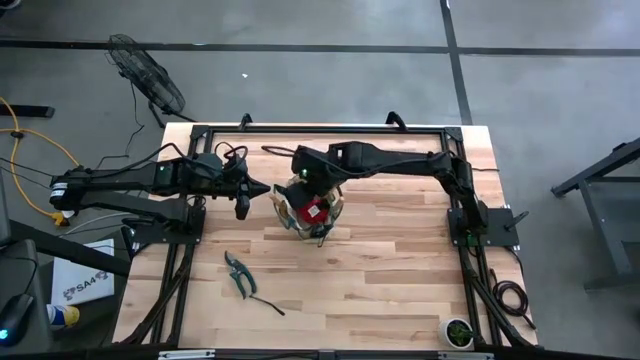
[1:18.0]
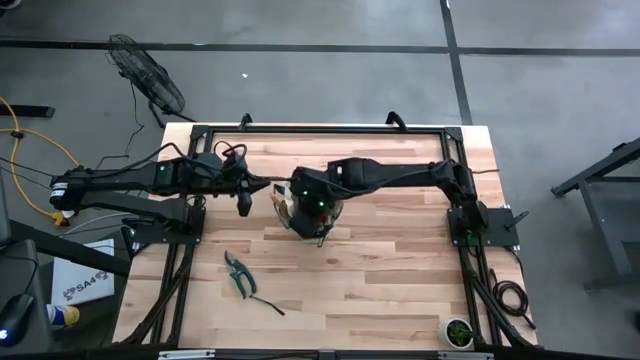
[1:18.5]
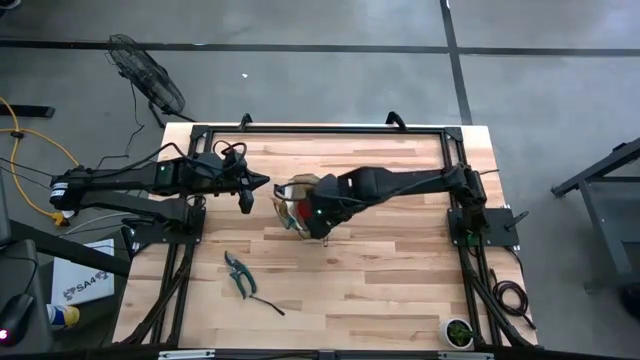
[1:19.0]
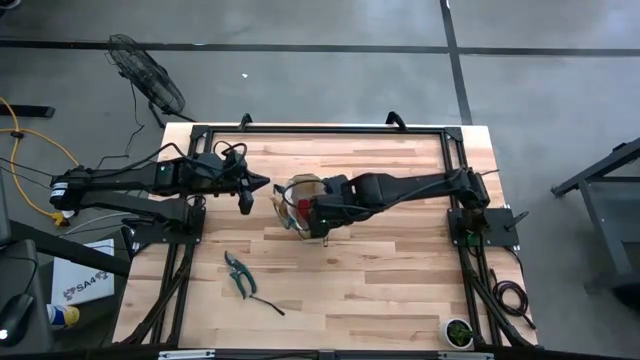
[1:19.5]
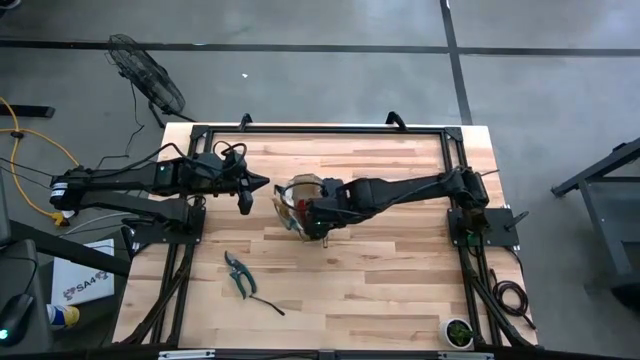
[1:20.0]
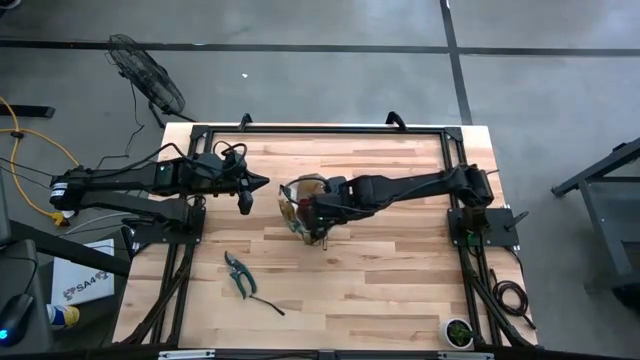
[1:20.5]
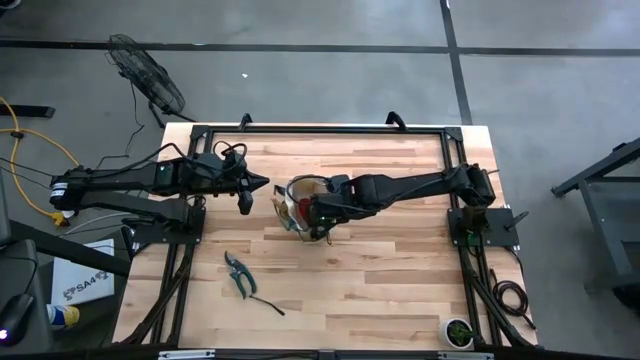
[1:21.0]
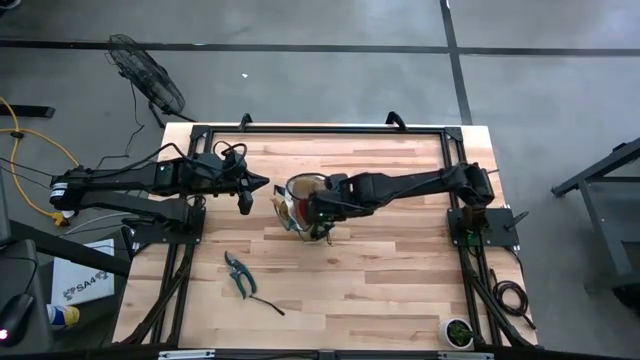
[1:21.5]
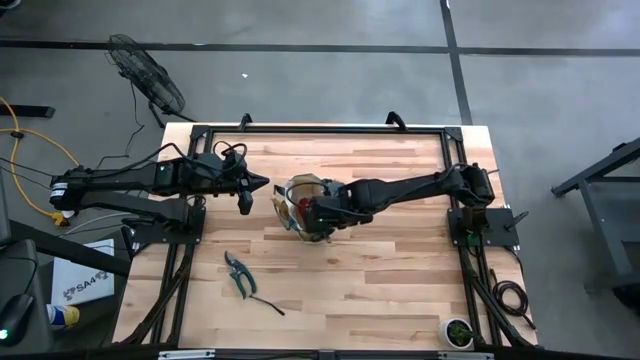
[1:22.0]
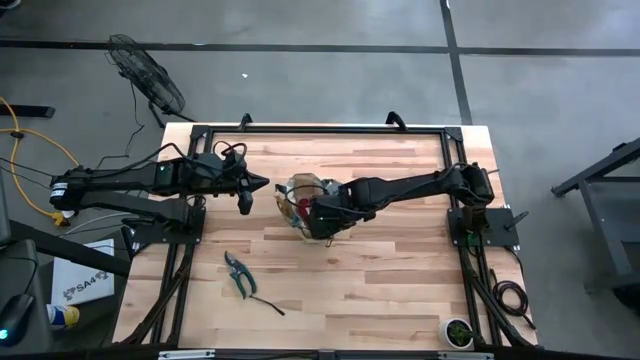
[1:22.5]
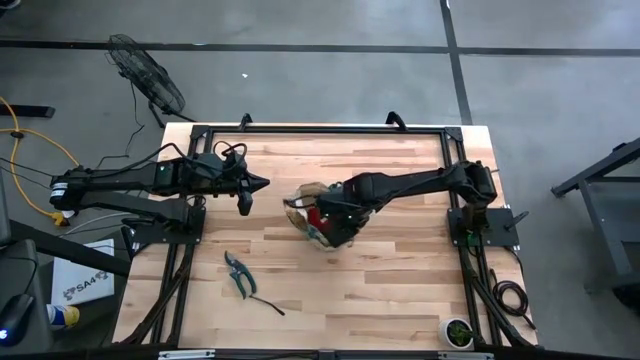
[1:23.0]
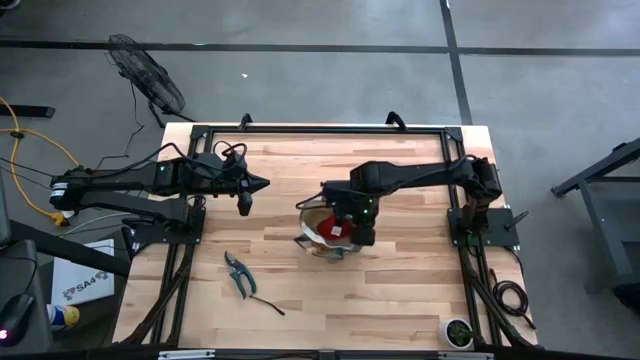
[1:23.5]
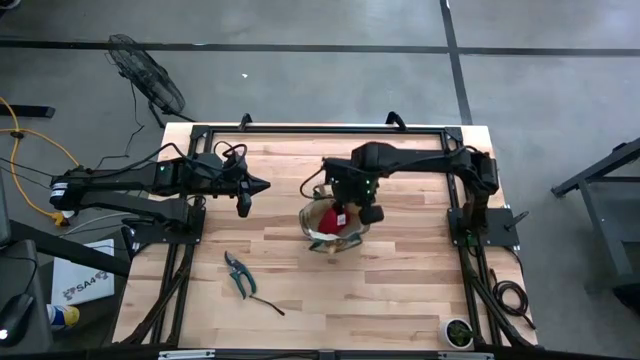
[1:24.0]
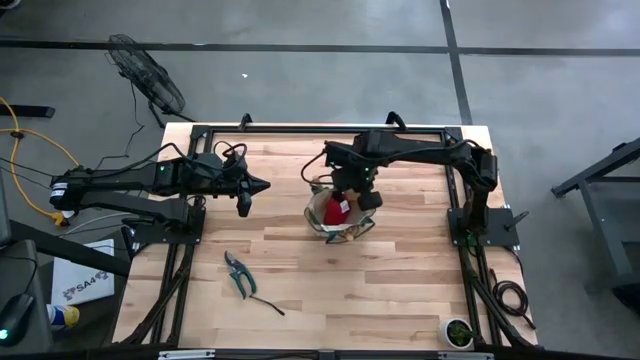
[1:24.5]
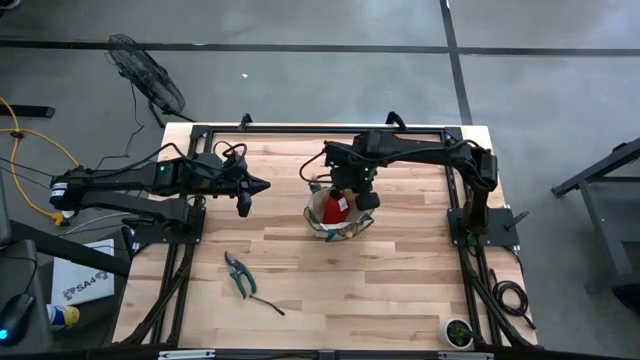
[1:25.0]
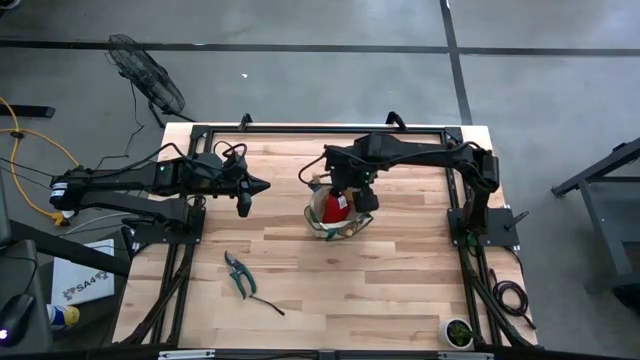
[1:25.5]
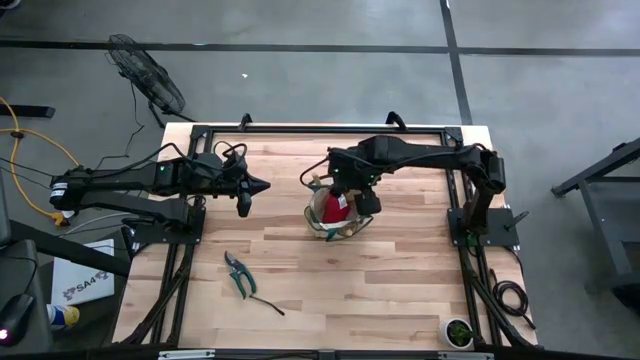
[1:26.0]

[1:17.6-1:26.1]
Task: Pick & Place Garden tools in Gardening bag
Adjust the brown gardening bag

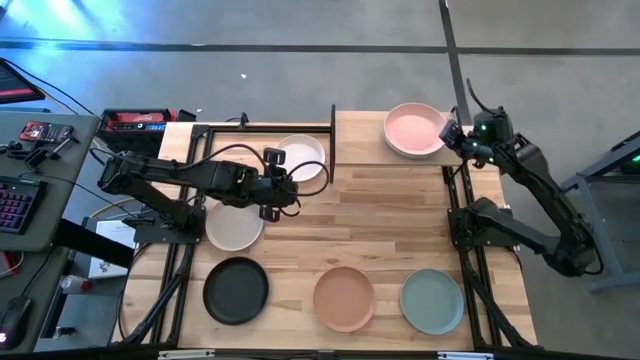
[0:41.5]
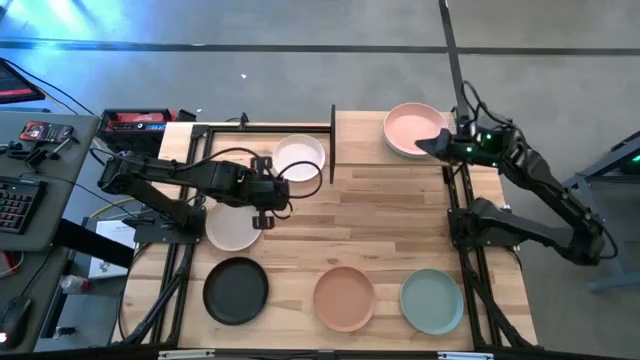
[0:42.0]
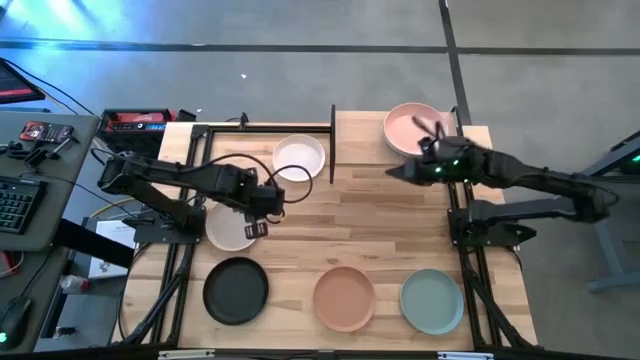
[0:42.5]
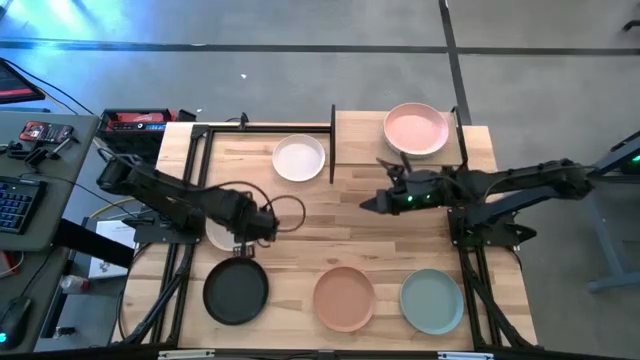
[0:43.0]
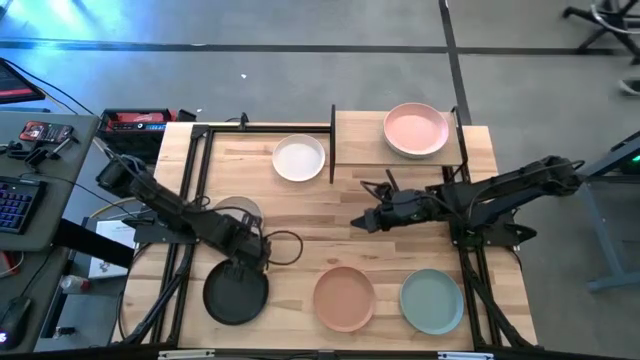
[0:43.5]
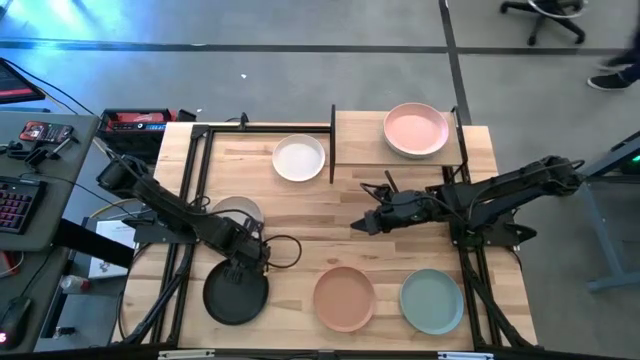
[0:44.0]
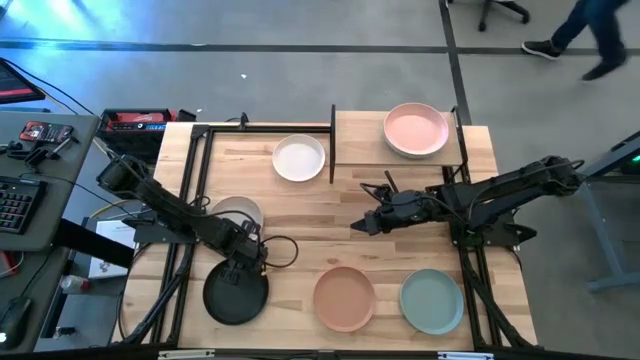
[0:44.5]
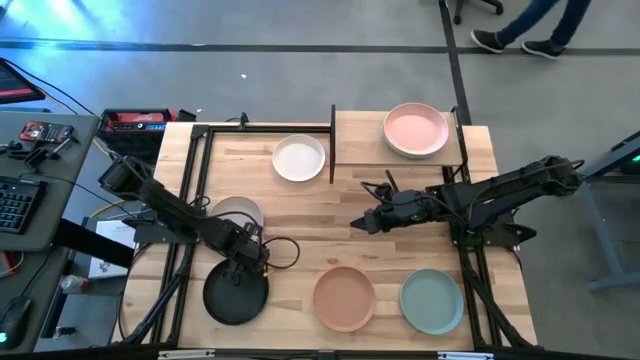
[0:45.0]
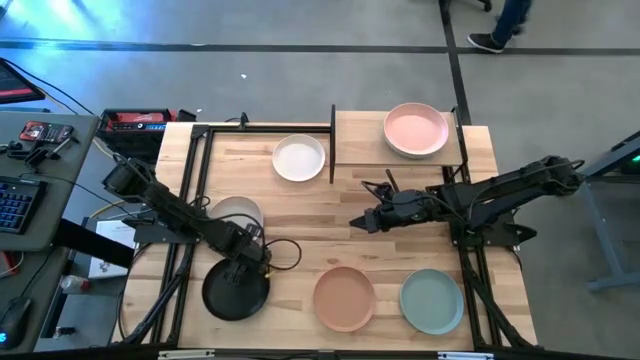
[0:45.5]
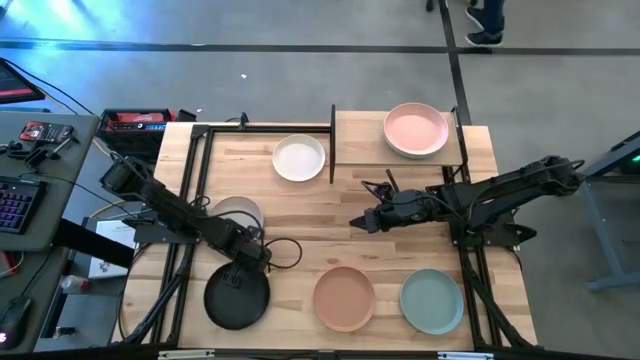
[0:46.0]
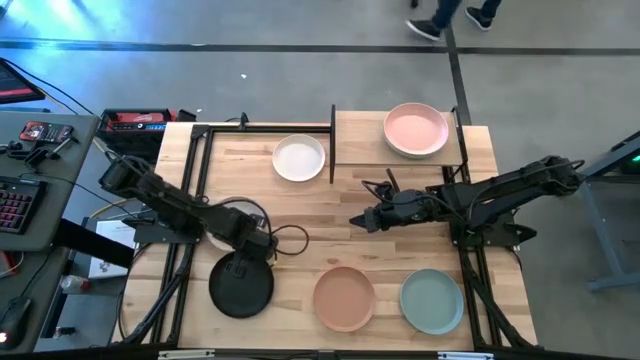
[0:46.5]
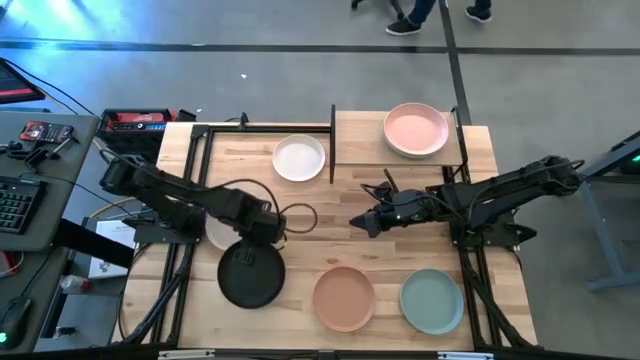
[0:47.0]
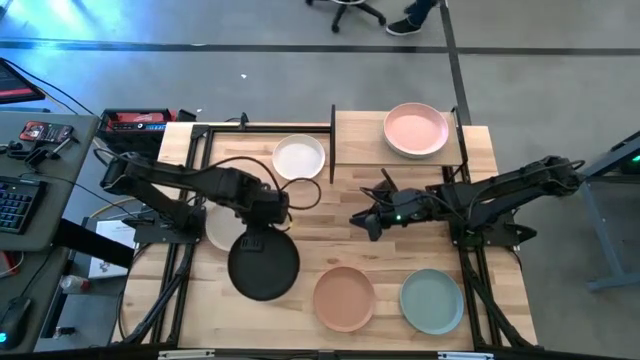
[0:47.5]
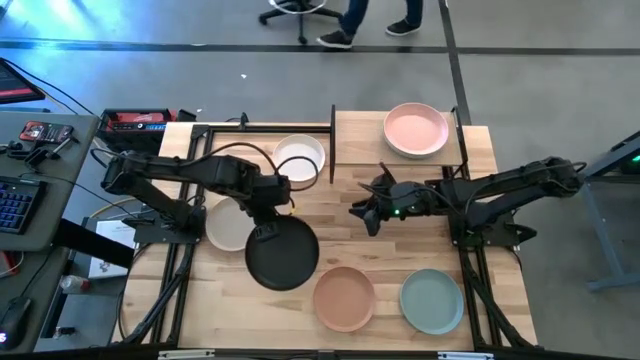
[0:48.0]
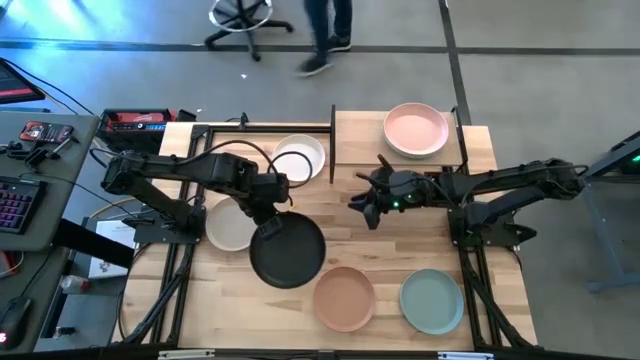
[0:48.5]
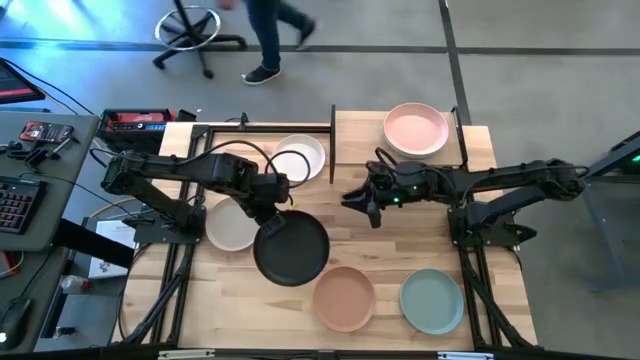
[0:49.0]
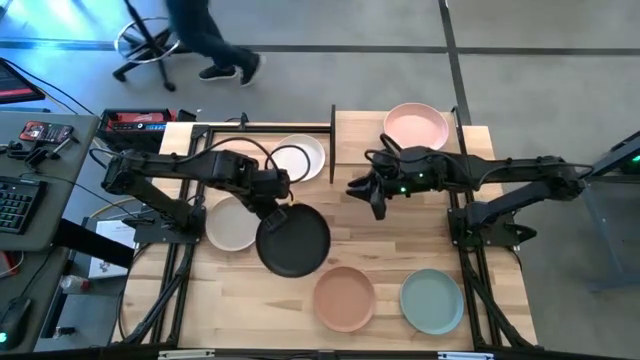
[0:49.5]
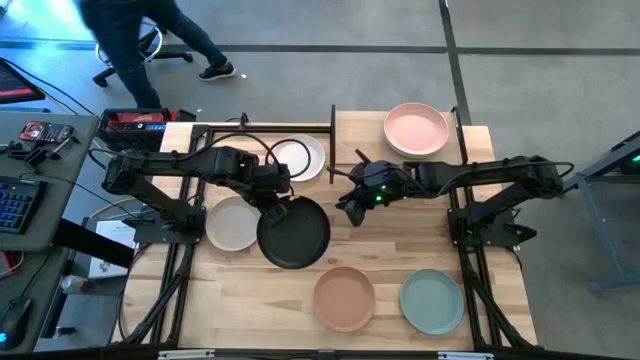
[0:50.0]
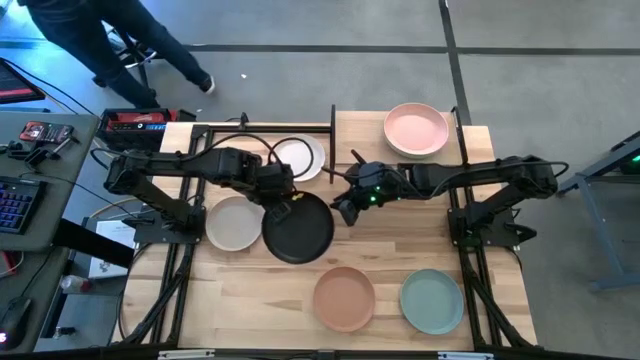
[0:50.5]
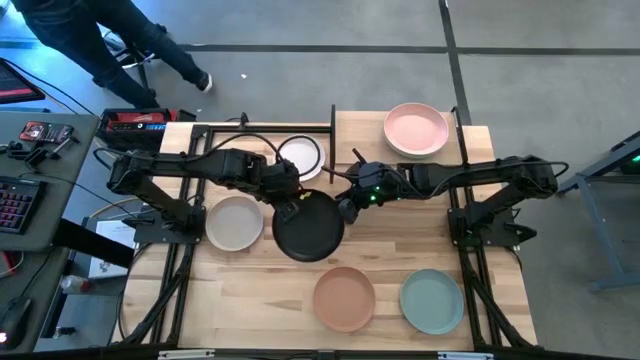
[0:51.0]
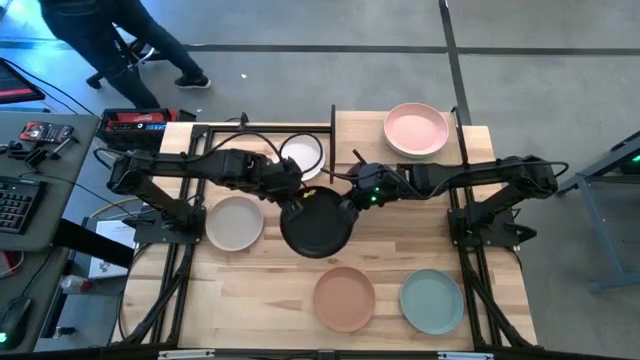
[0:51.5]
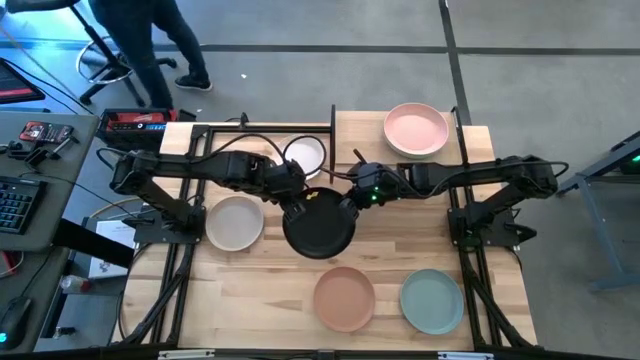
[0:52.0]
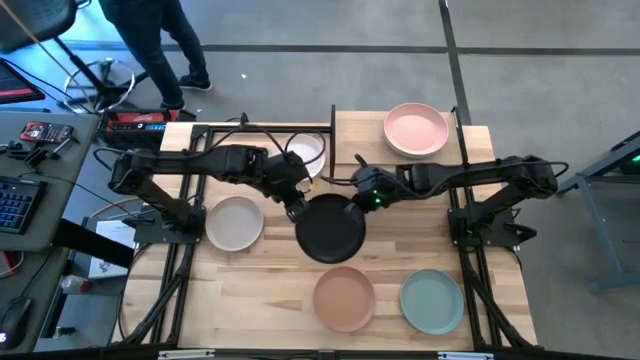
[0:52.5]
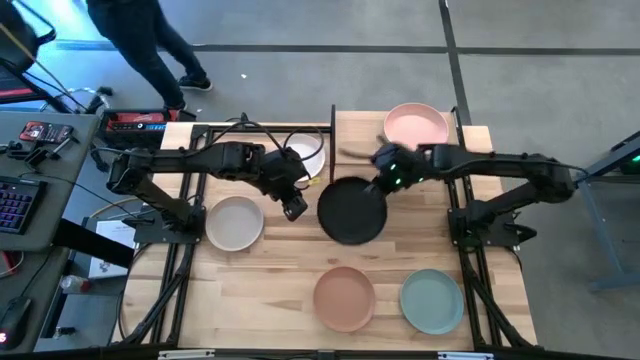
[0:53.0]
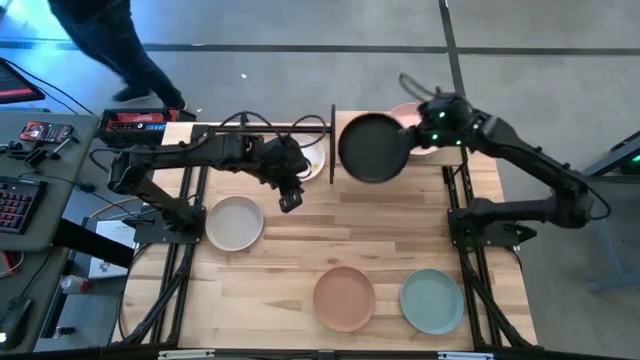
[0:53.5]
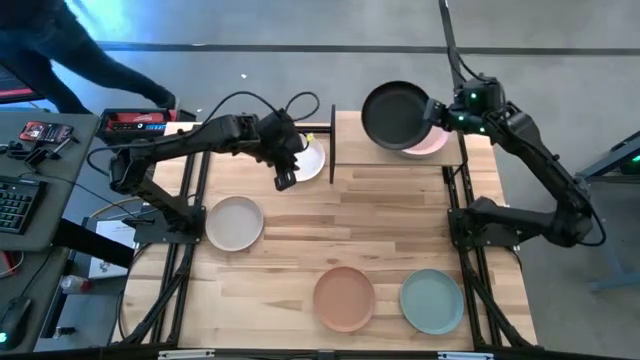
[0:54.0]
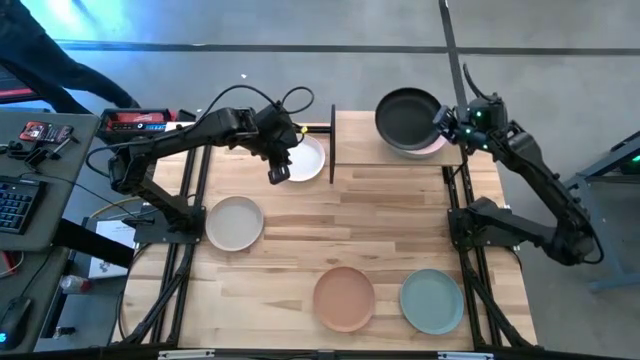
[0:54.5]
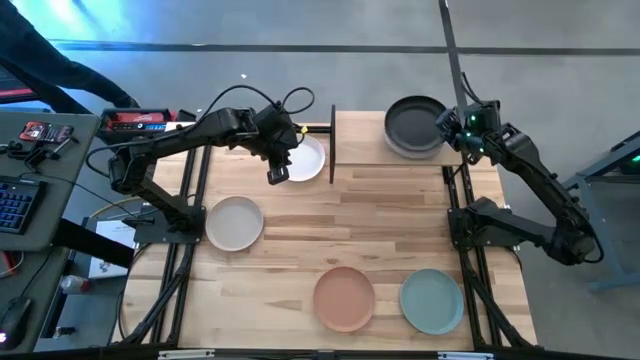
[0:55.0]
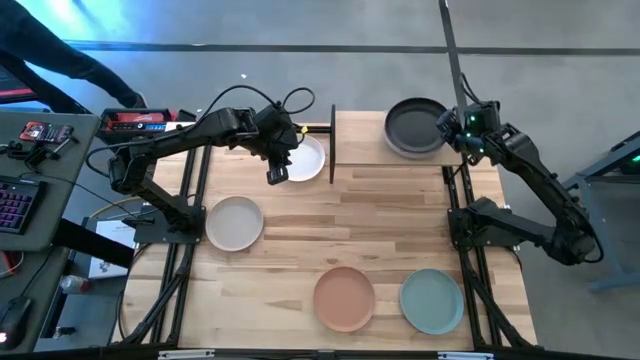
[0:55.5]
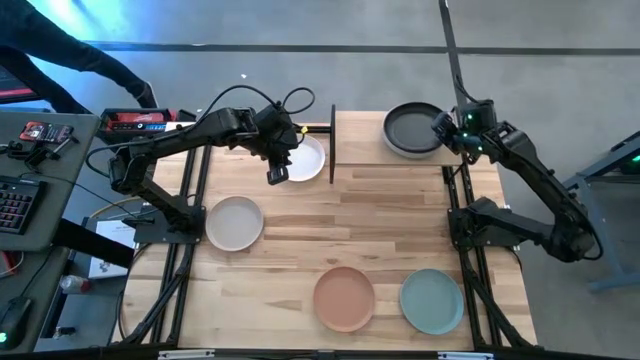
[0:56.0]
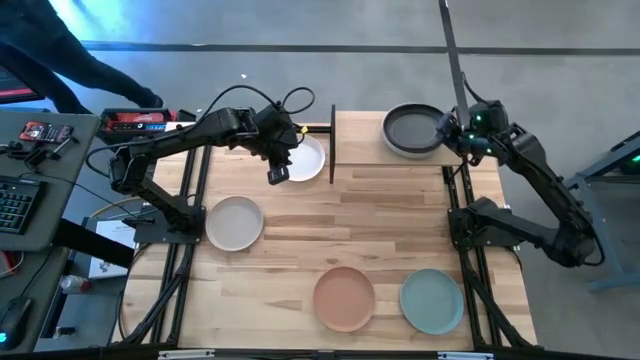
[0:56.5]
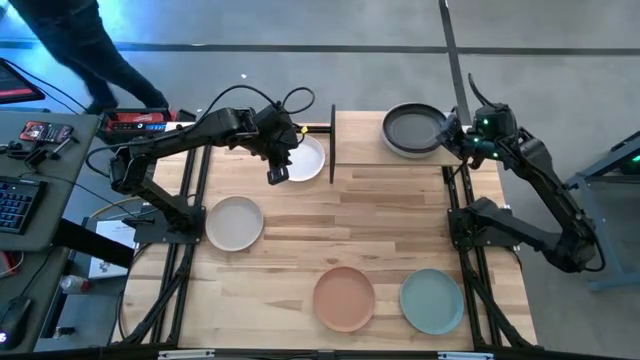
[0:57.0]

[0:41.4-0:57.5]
Task: Place and stack plates onto a shelf
Stack the black plate on top of the light pink on the shelf
